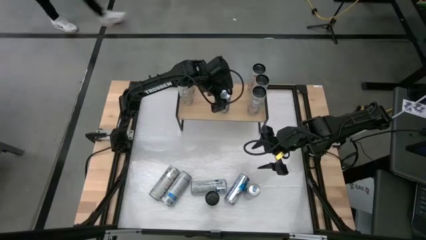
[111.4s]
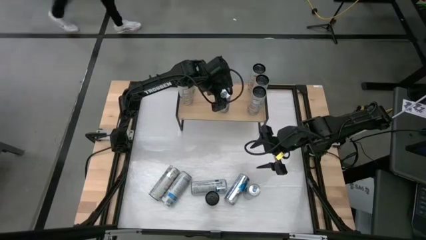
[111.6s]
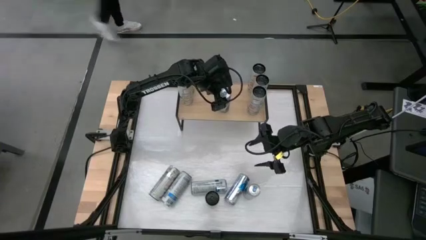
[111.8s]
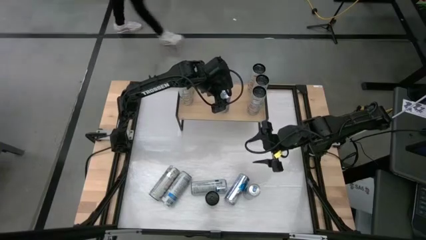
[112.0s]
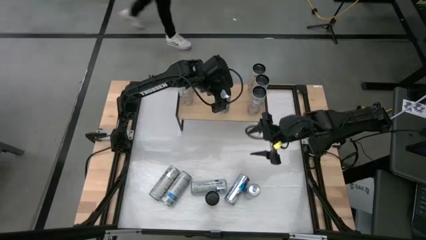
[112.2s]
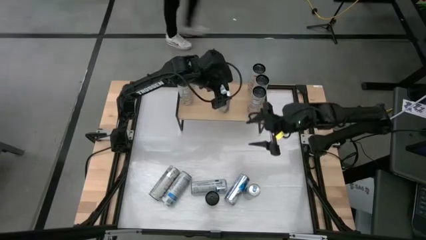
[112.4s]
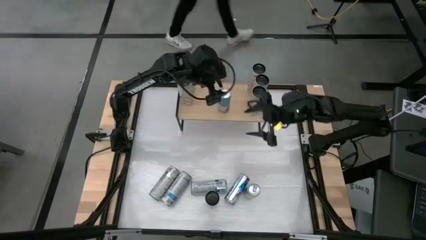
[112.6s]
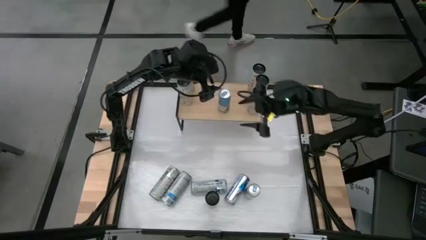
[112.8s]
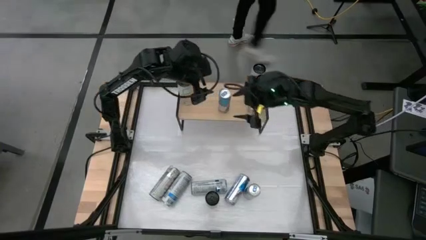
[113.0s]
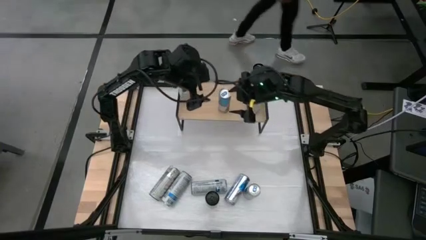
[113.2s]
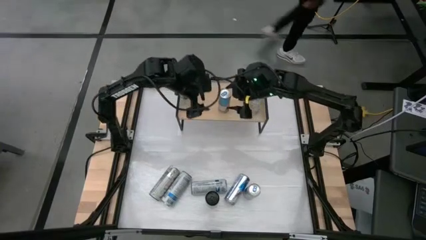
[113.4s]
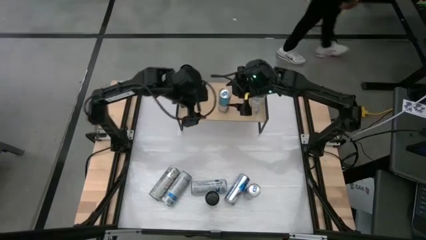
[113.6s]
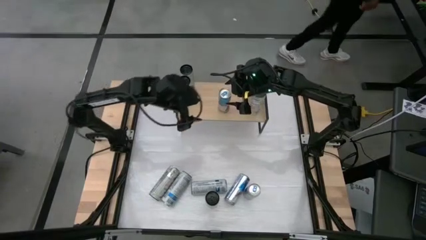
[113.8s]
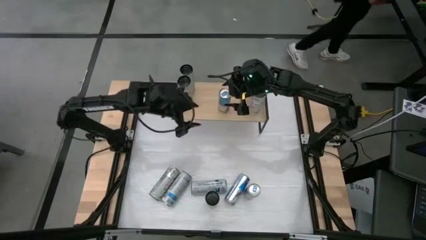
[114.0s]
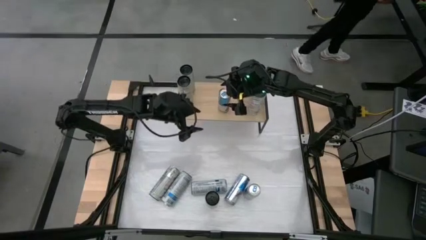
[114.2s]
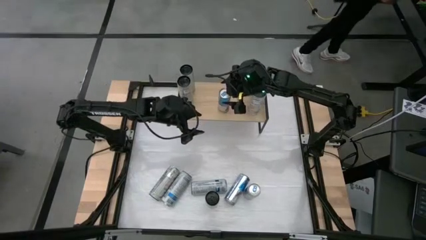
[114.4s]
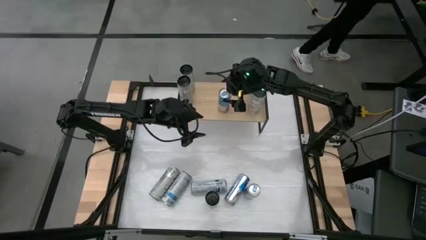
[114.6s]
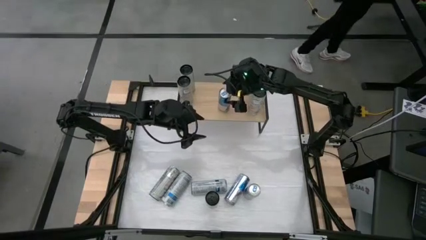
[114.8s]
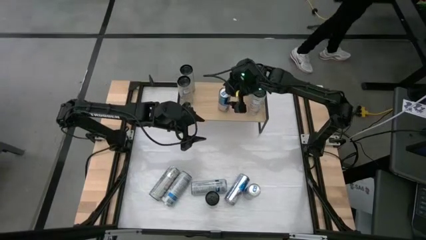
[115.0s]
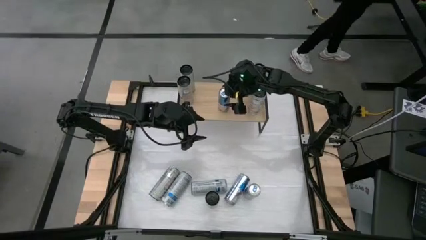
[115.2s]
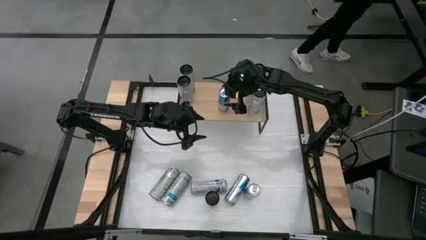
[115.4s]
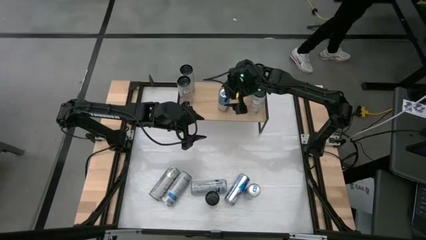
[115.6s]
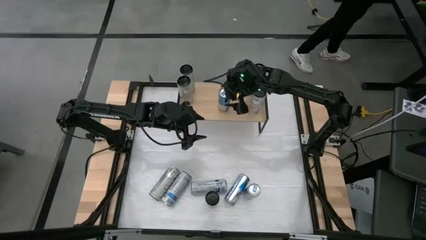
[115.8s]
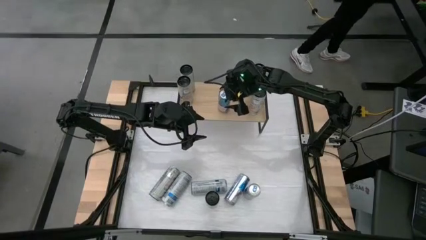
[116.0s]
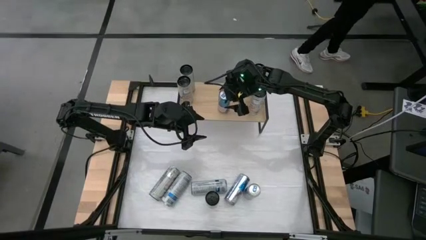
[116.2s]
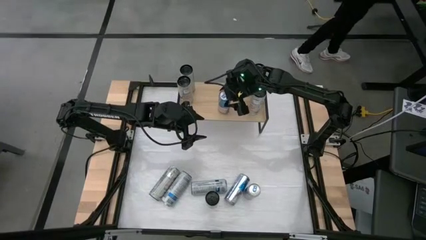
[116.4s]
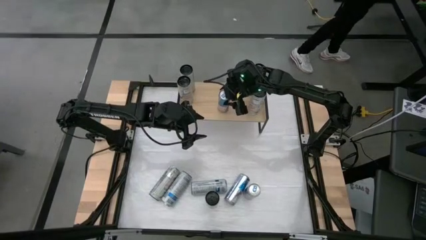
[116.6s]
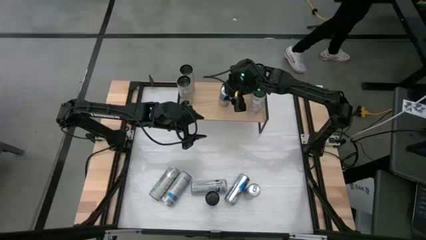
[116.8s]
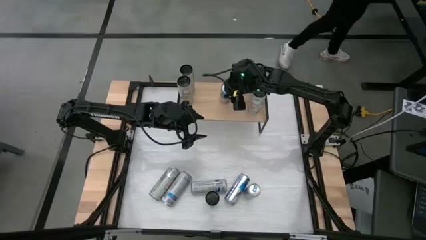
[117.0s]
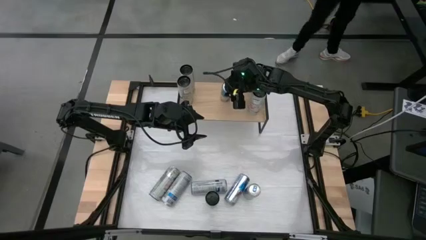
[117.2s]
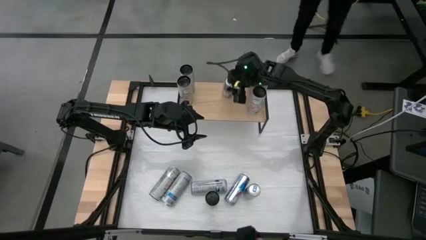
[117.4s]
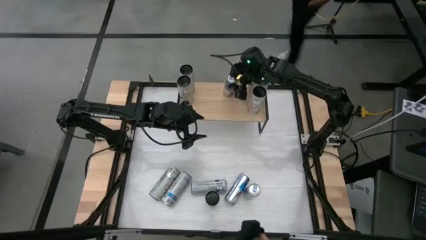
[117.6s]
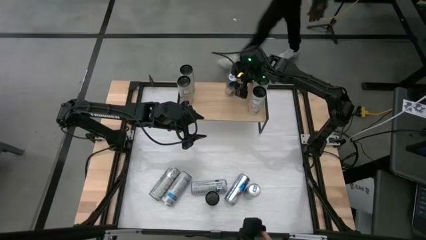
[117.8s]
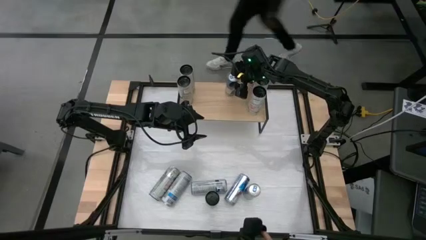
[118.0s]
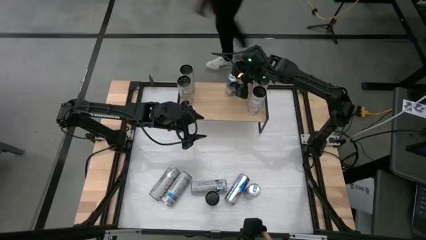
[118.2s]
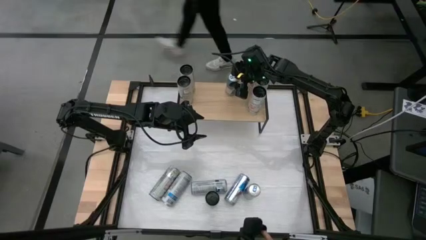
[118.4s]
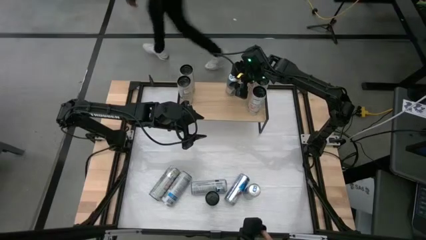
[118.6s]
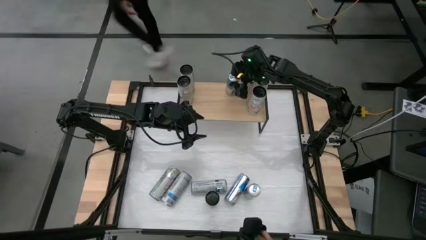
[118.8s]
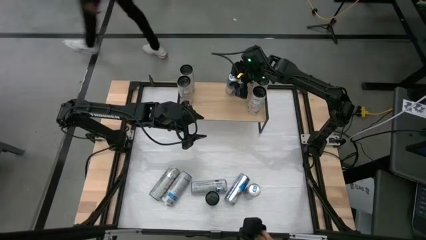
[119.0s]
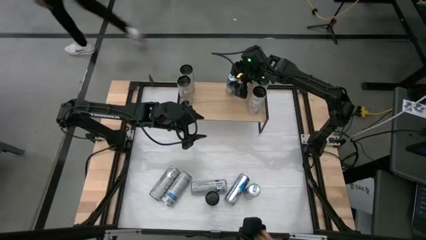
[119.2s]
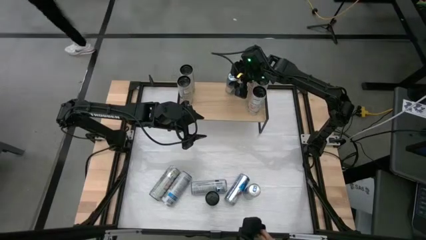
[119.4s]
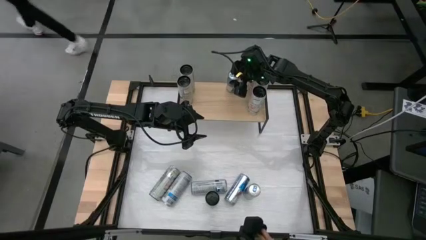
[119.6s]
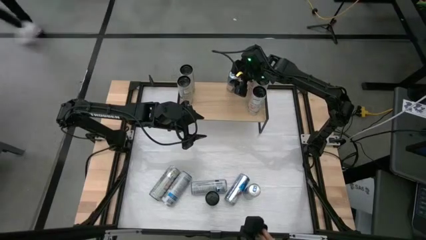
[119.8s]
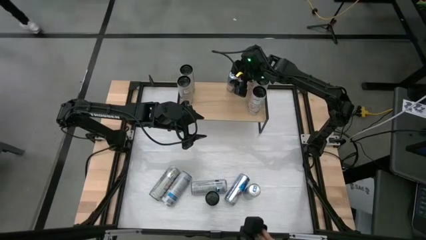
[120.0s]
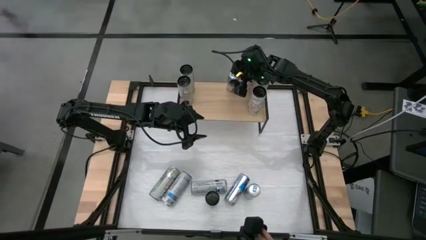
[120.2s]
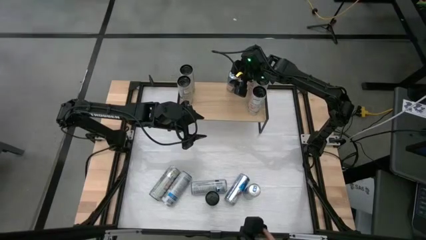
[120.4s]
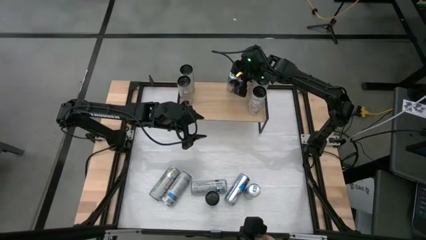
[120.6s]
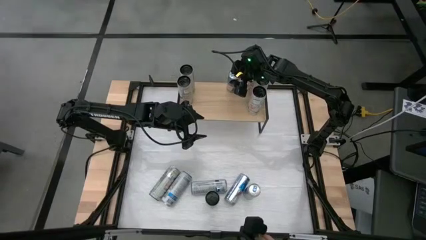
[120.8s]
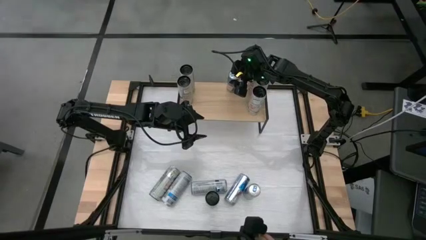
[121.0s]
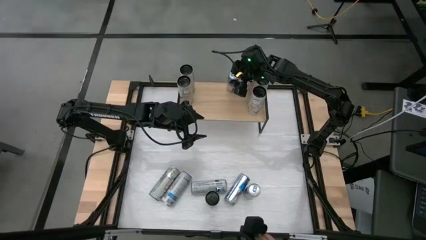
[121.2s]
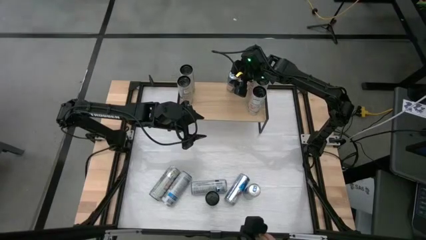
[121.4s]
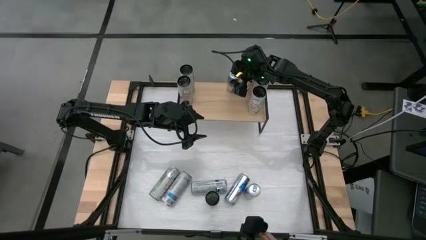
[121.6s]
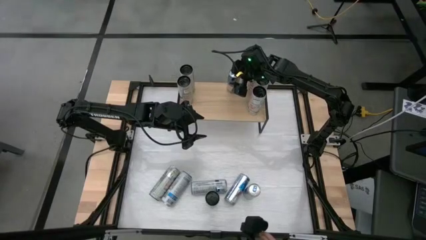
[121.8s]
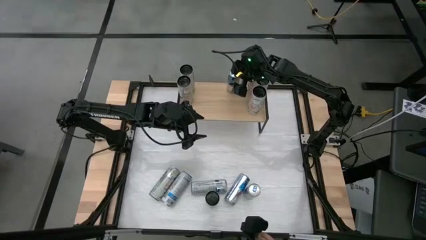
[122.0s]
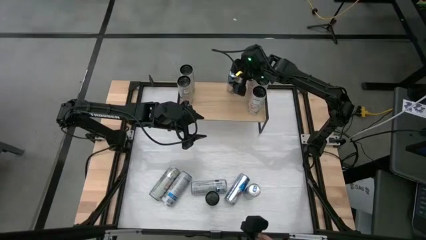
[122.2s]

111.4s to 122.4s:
Task: Sort soda cans
Put the top blue soda can on the shelf

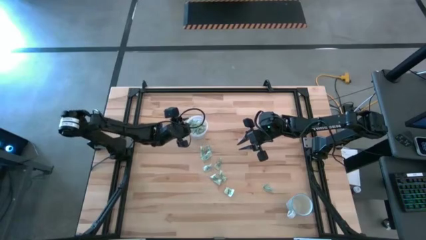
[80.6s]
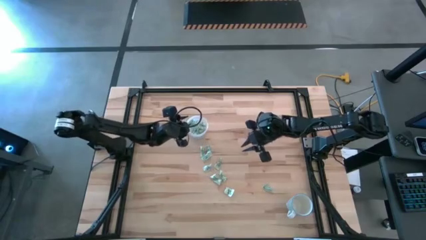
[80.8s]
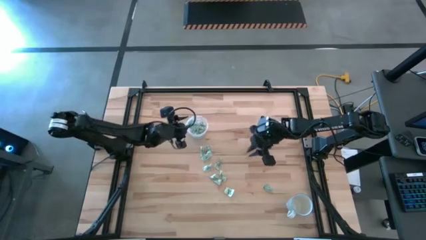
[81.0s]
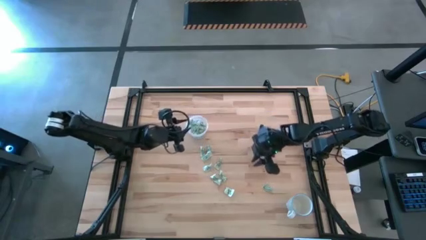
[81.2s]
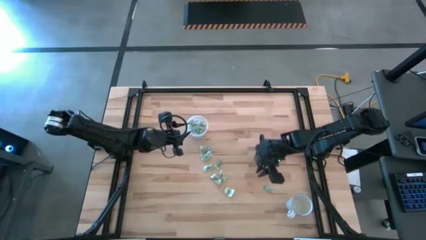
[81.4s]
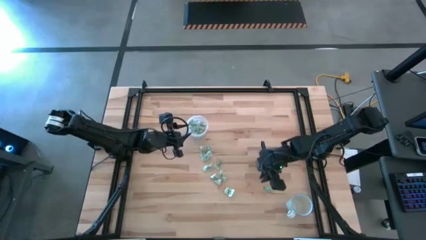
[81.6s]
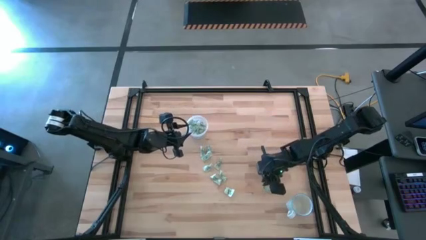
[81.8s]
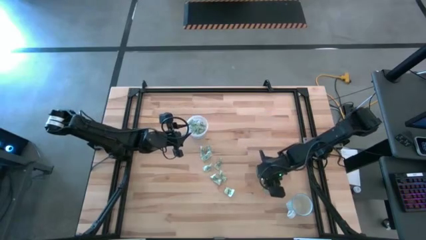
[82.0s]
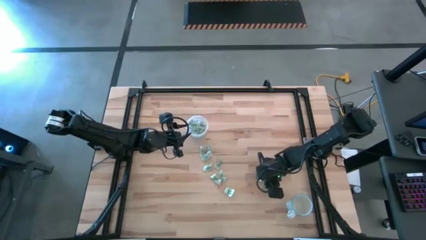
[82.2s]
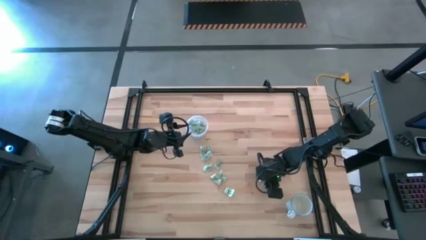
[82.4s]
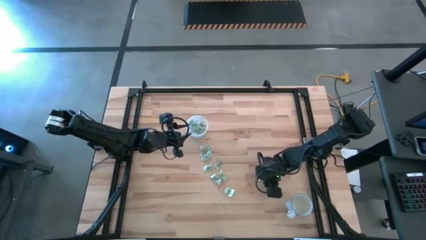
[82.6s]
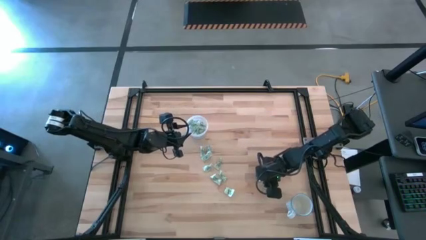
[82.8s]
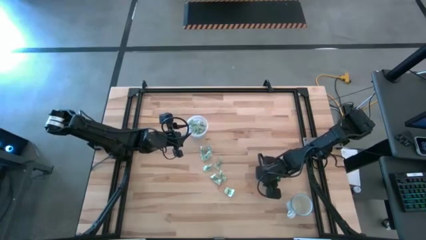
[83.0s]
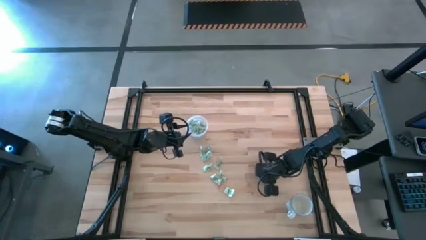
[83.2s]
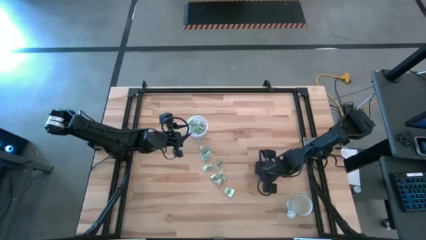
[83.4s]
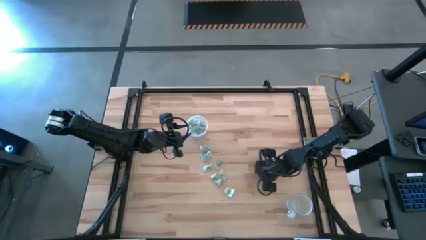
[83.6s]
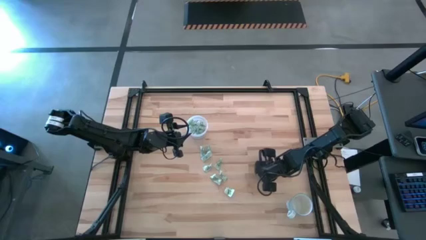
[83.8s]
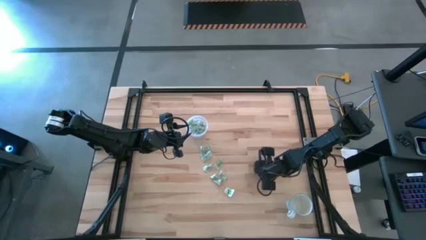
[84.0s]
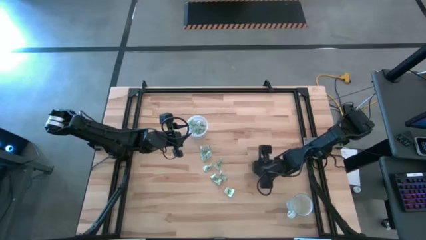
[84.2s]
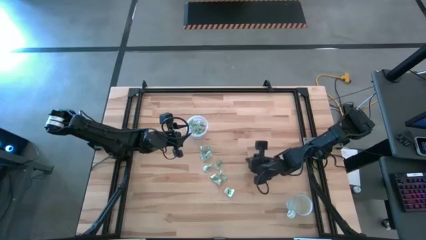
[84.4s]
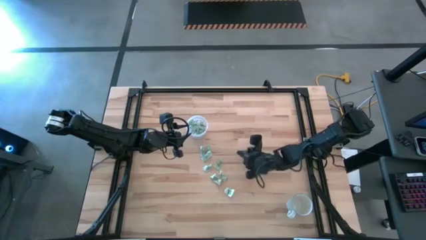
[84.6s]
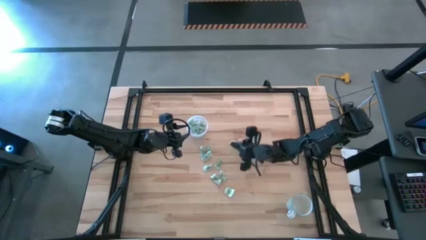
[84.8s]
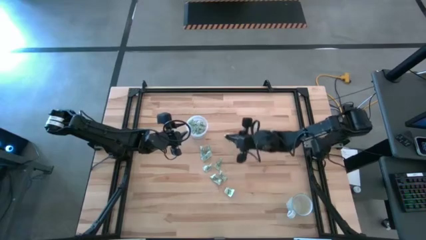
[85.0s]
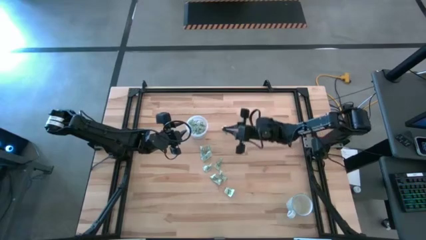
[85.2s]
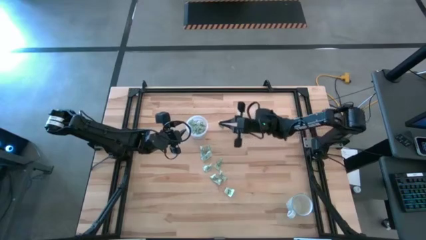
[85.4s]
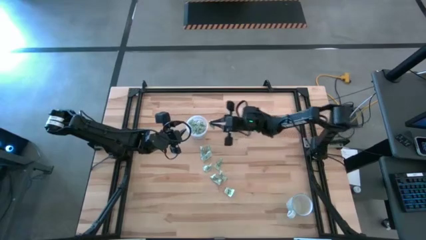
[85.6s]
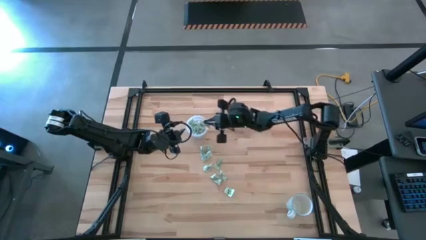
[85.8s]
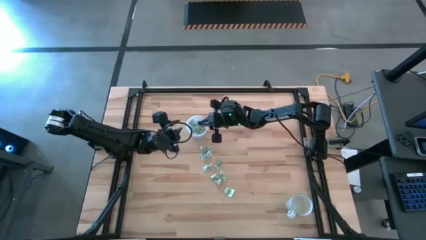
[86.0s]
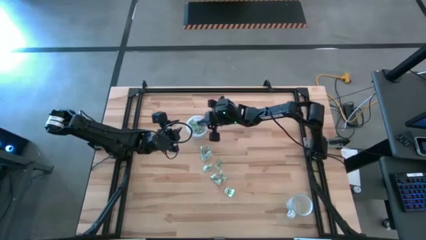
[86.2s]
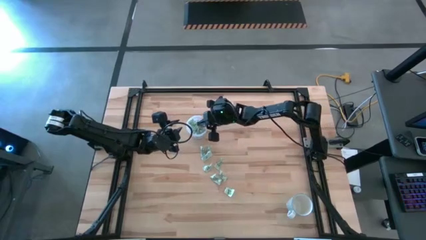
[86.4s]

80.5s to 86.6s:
Task: Pick and place Stevia / Truvia into bins
Put the stevia packet into the transparent container

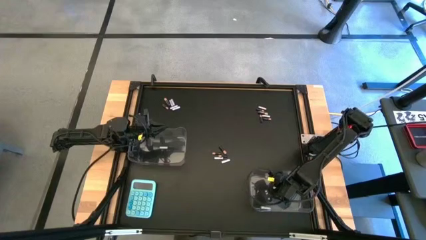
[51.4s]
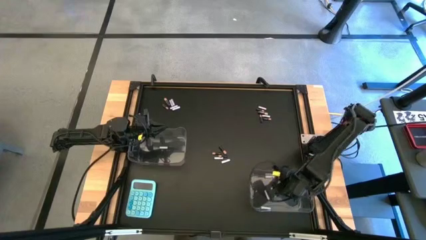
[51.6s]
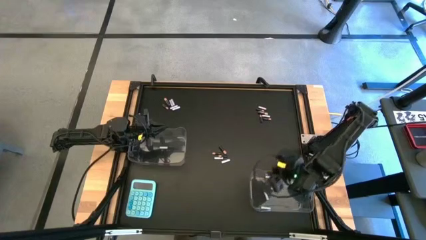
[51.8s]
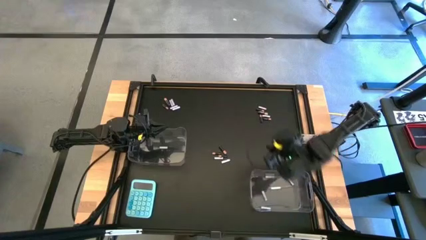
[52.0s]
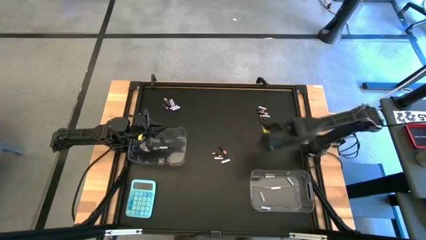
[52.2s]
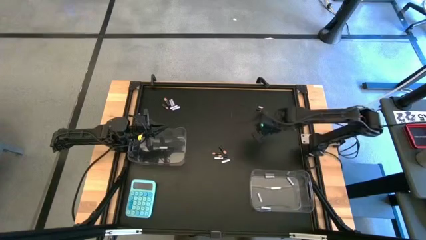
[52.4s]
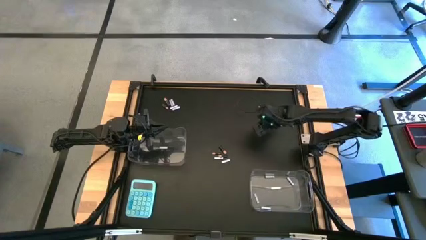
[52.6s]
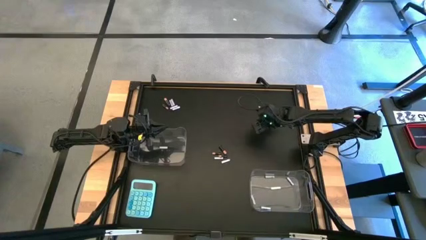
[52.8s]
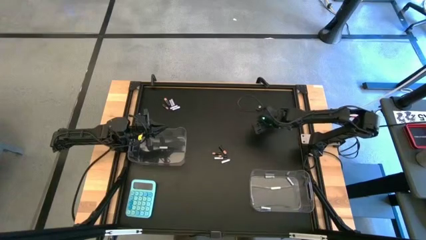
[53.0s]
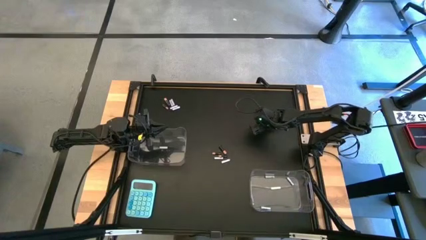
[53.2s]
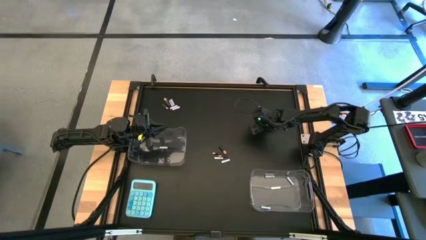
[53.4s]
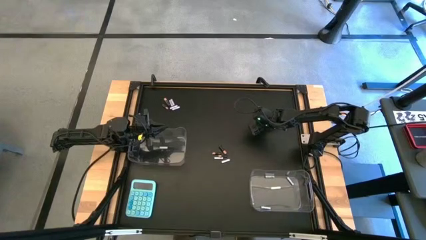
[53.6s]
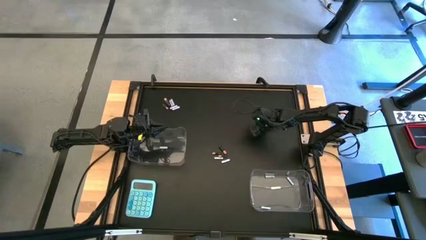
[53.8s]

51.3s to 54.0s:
Task: Sort batteries
Put the black battery into the left transparent bin
